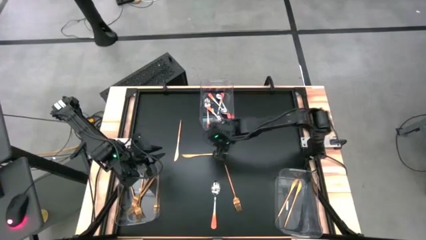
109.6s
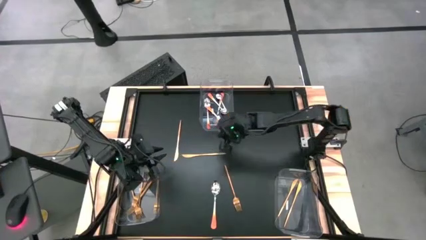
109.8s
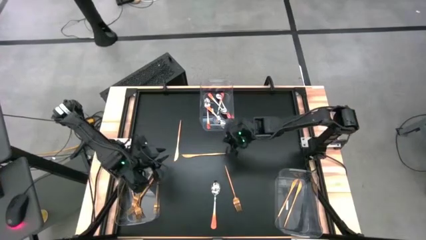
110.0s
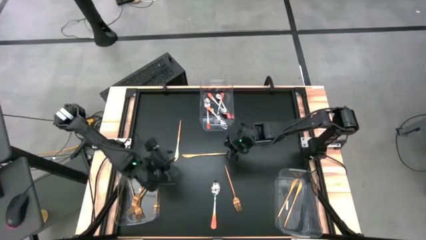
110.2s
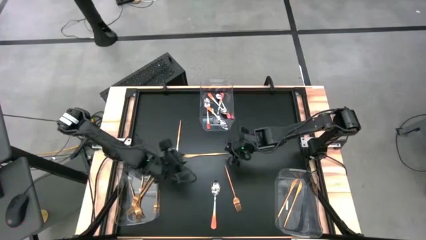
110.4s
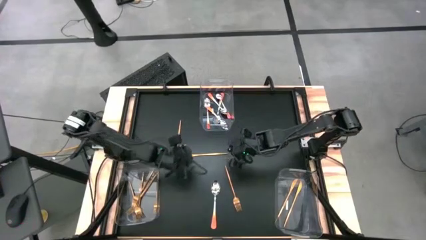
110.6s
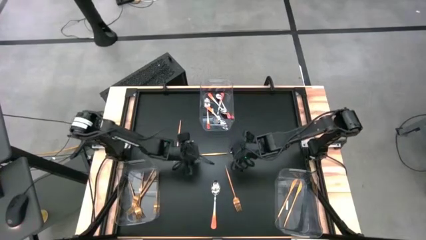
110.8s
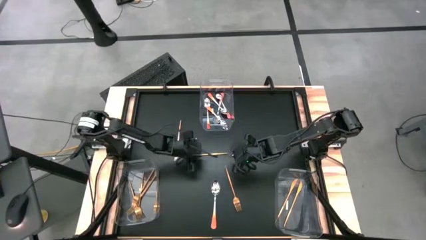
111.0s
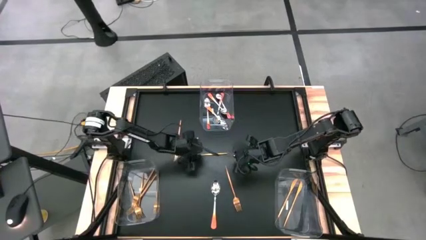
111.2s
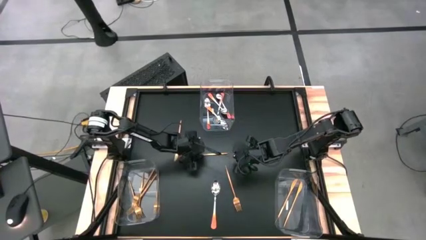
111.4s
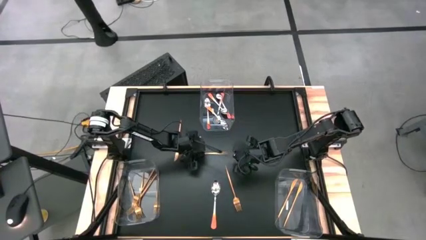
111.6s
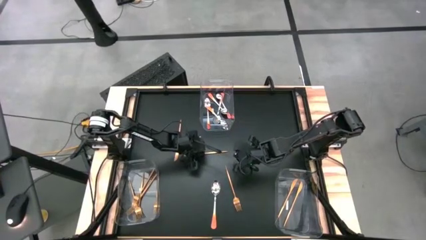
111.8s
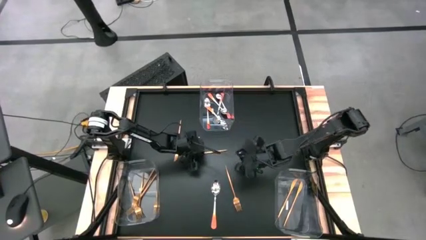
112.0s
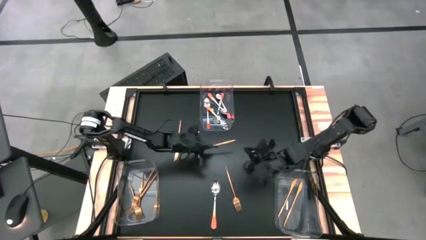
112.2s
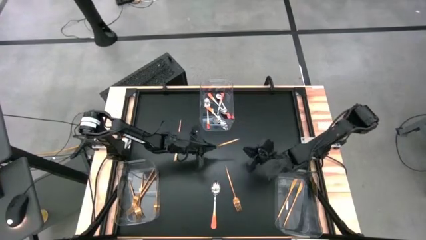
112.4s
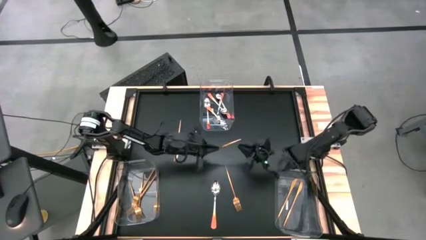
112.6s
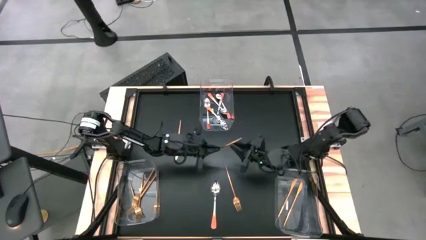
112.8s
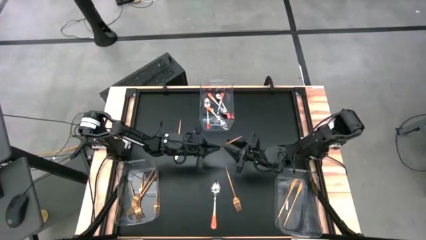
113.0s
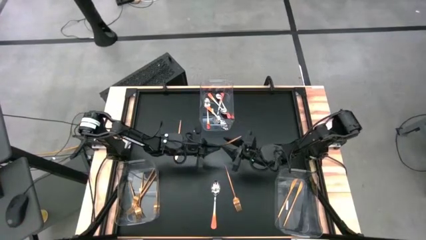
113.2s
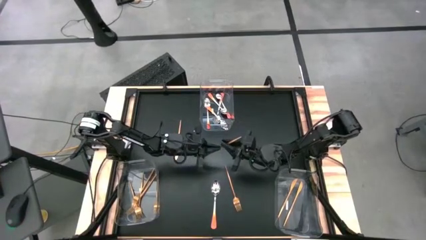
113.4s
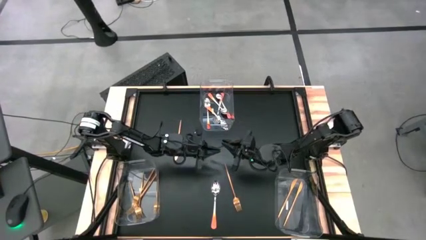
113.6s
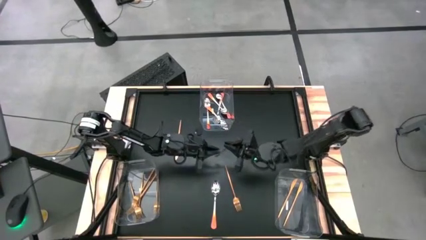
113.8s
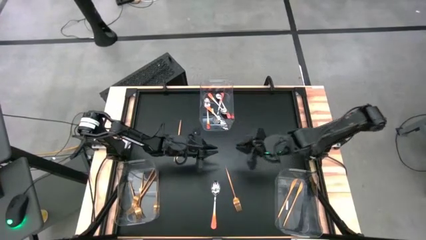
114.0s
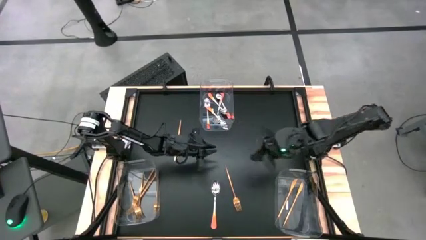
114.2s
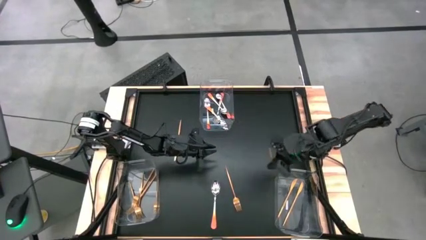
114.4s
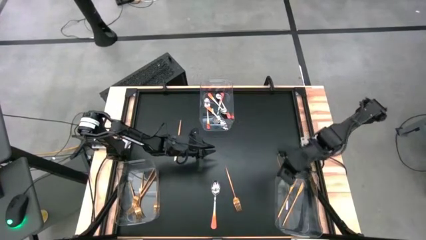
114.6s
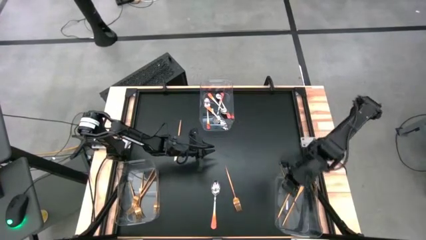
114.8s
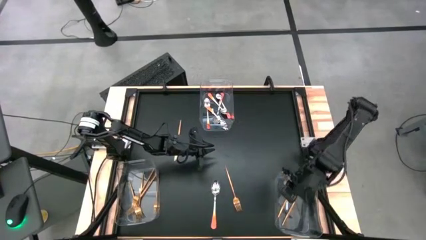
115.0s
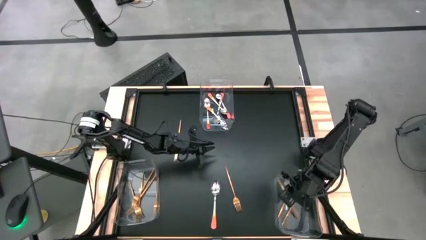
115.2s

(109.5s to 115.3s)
Task: Sort silverware by color (type)
Put the gold knife into the bottom right transparent bin

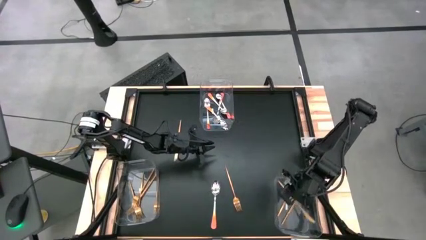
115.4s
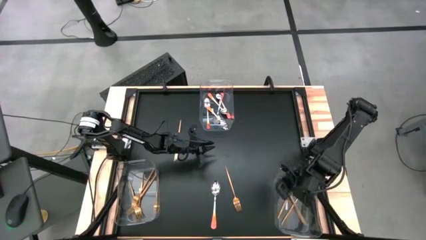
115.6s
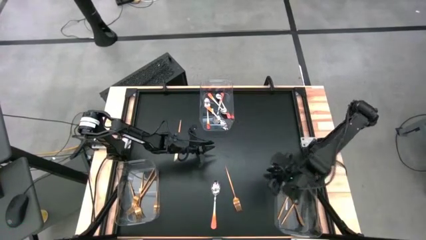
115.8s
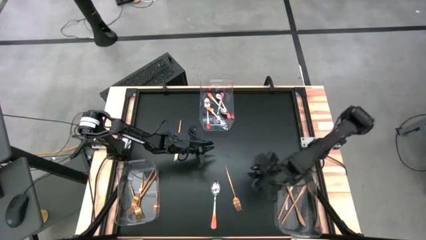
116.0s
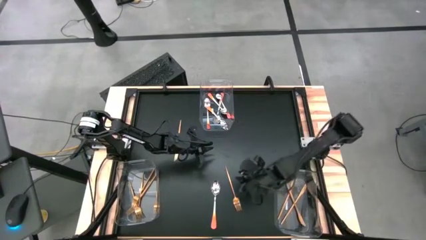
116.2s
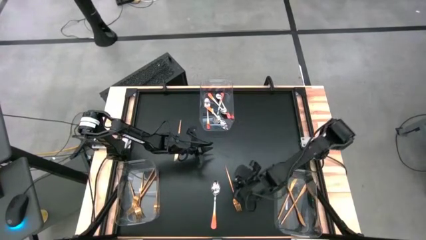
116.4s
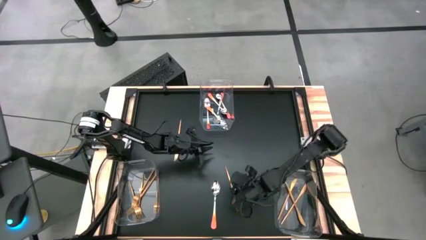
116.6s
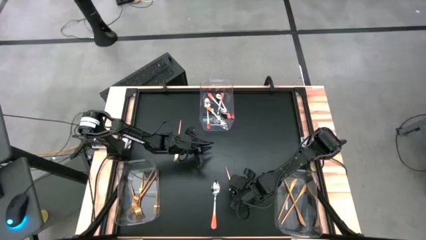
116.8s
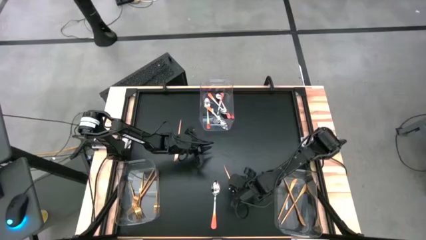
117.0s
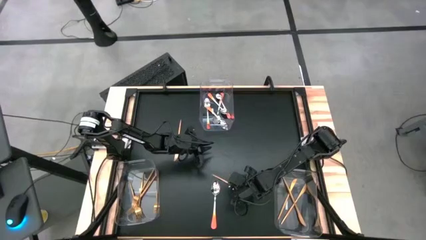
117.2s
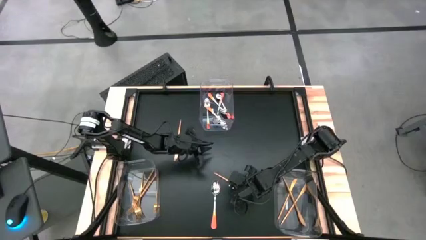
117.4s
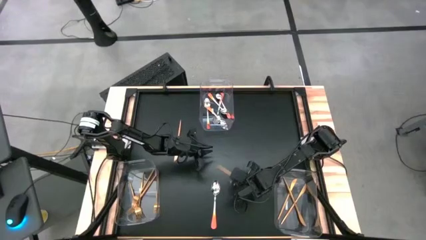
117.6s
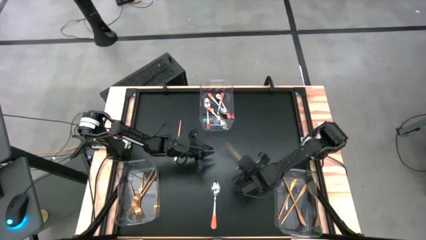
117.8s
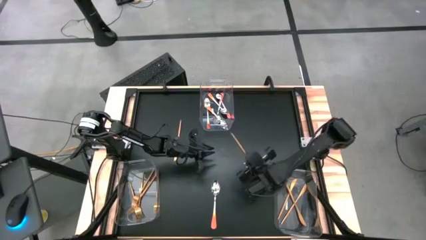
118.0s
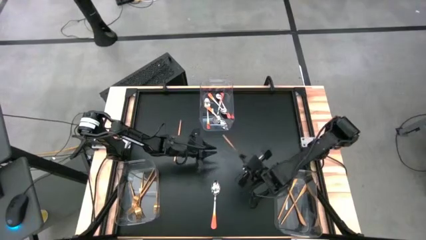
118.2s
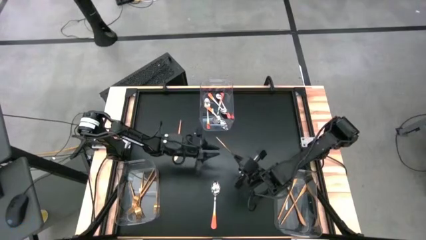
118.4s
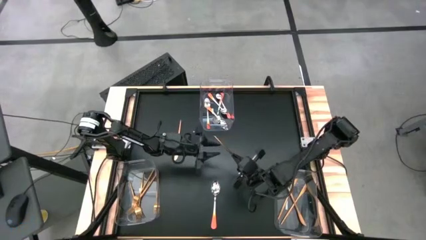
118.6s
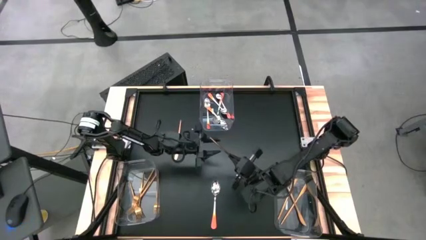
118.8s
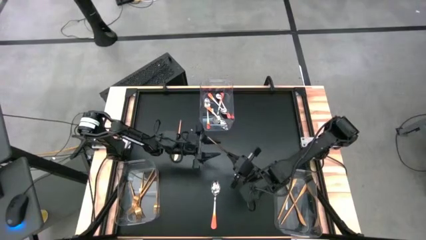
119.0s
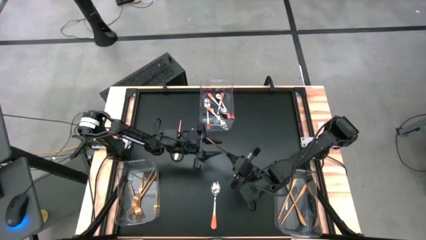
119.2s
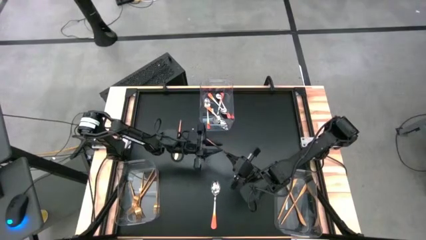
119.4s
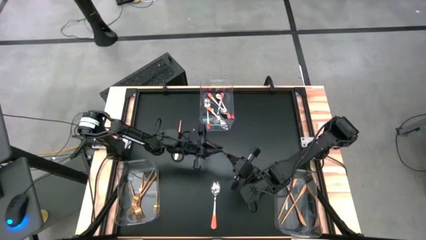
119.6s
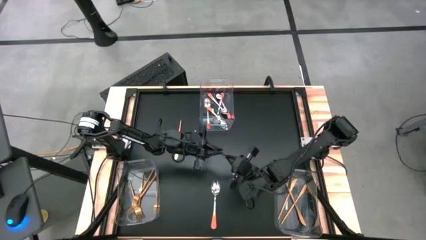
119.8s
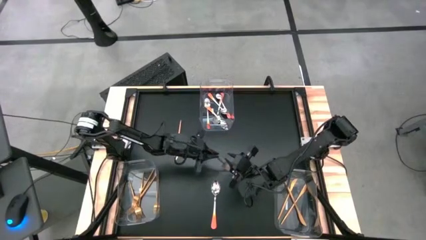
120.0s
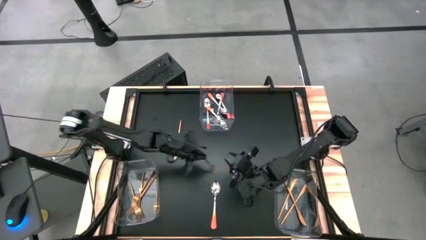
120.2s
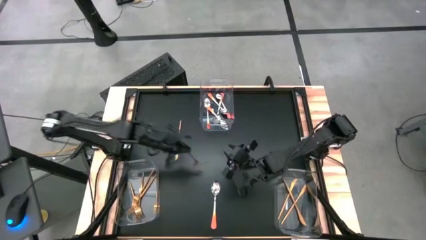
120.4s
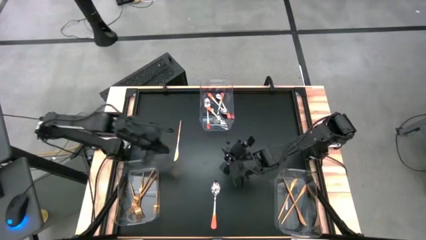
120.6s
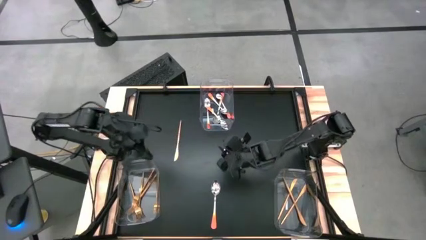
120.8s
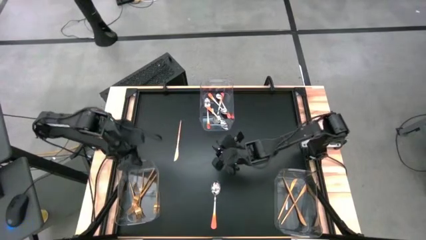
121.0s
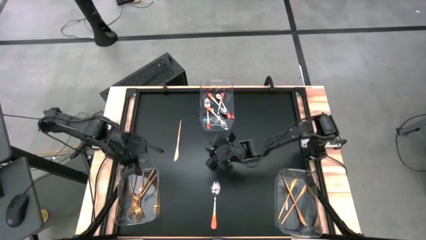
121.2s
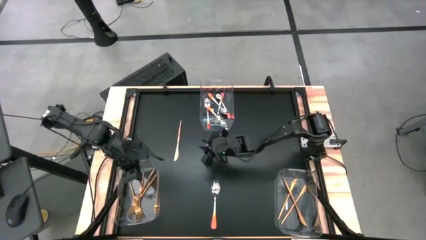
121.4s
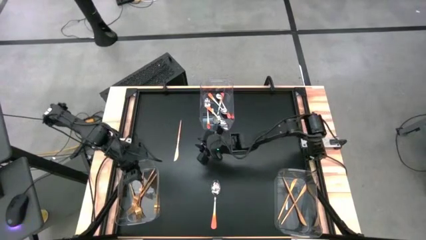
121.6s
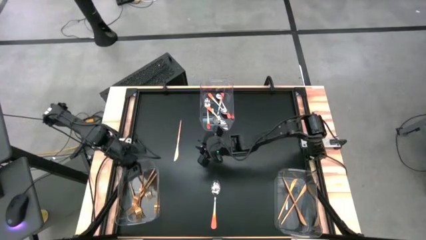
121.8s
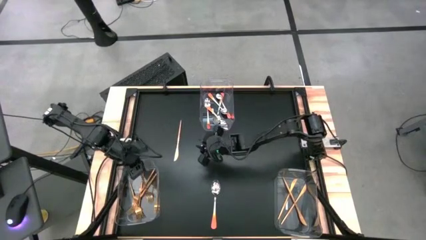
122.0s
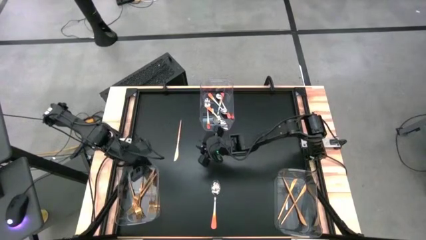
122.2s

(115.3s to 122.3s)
Put the gold fork into the bottom left transparent bin

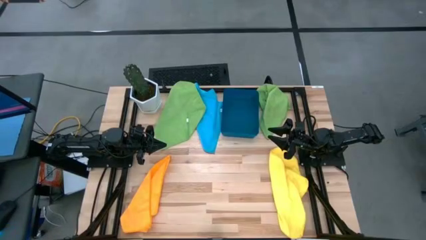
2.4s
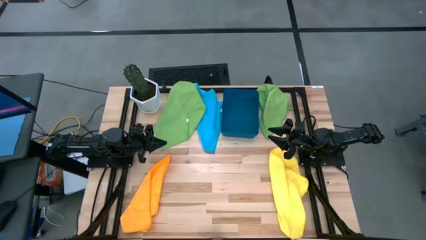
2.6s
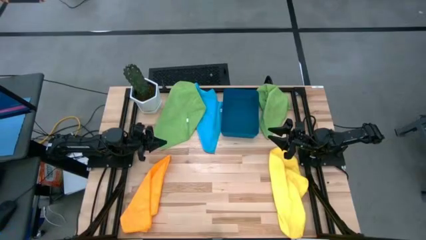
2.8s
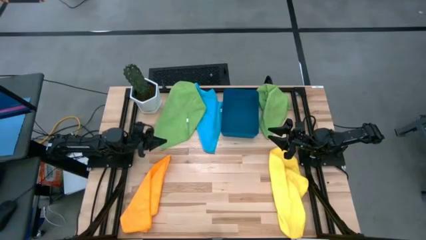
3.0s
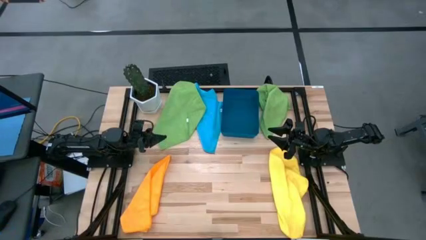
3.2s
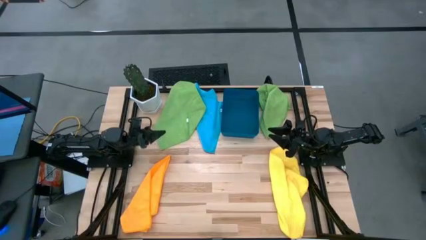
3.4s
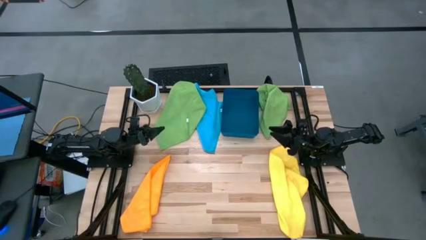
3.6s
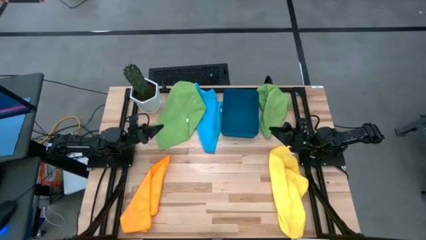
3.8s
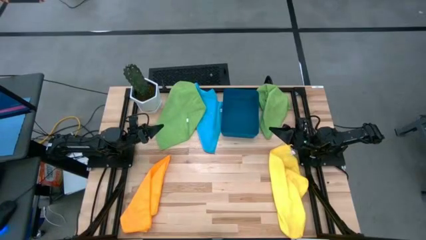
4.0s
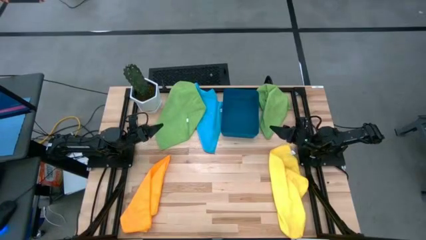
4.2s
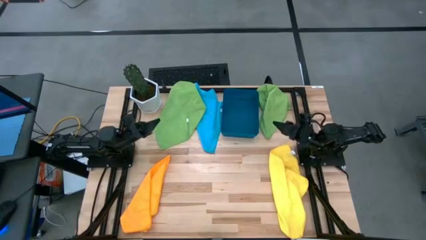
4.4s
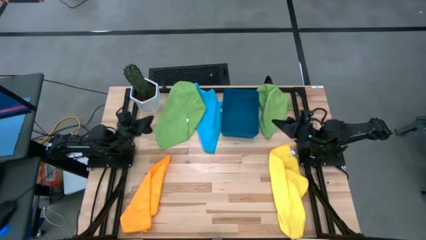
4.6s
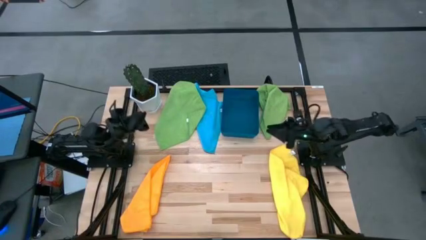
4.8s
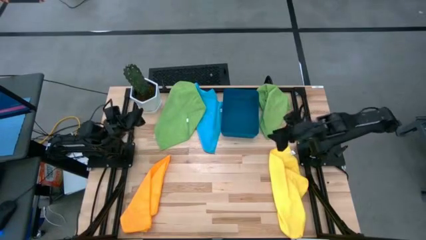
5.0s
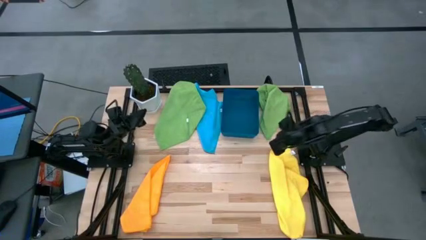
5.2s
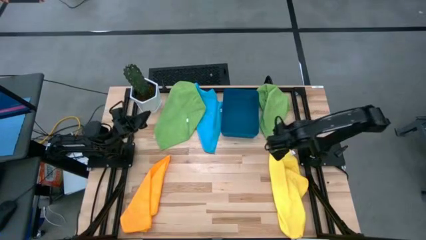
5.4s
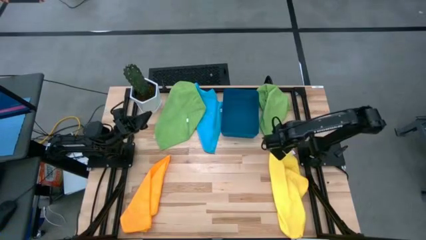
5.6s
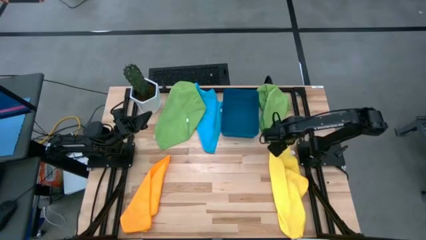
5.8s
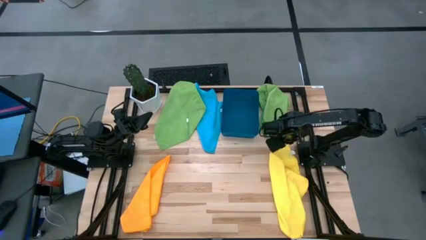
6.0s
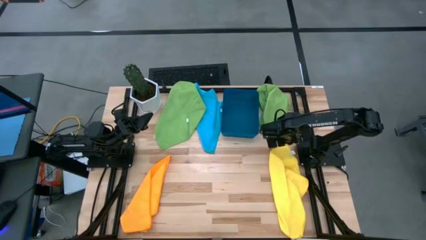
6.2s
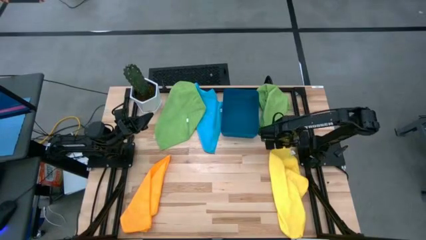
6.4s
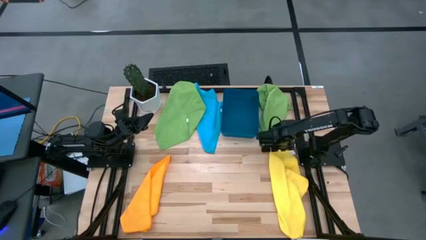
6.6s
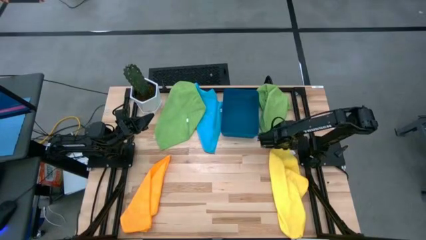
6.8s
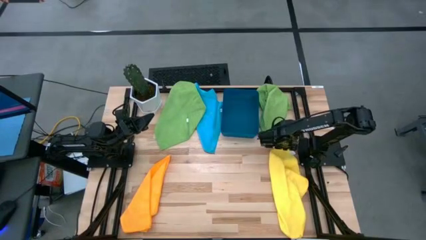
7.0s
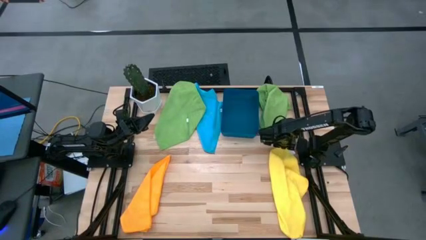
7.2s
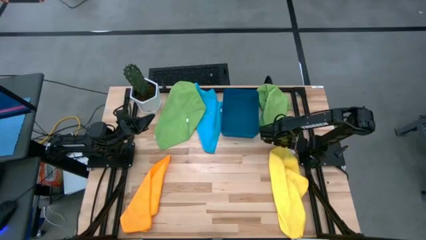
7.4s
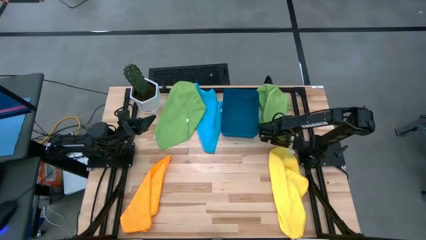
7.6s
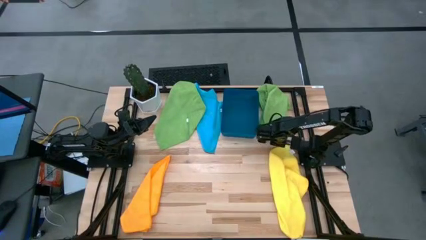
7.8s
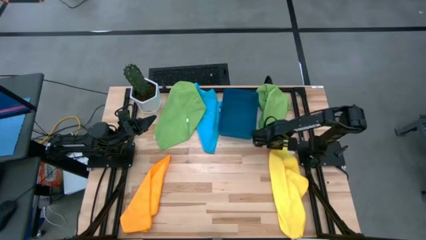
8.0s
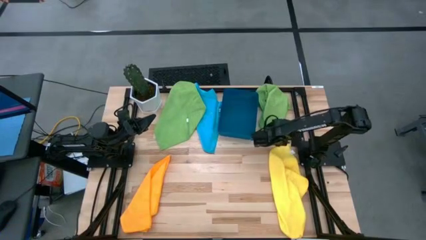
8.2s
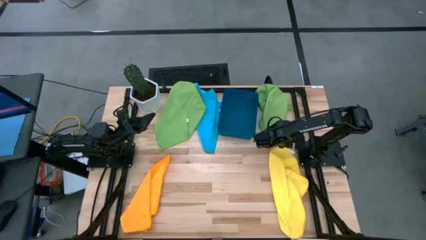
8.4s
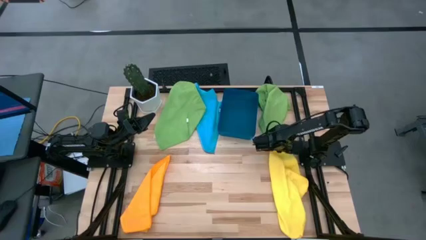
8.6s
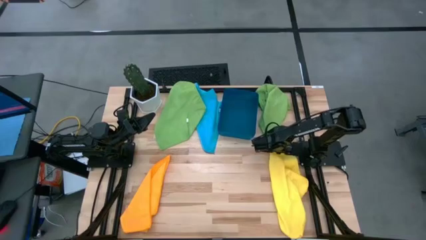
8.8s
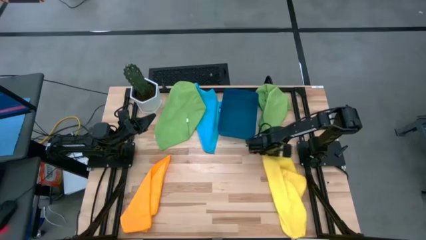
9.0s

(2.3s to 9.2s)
Task: Fold microfiber towels
Fold the yellow towel
